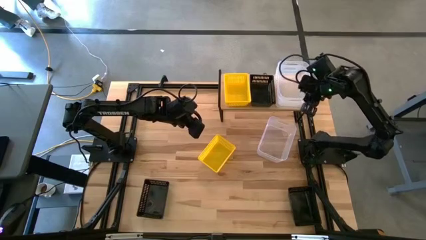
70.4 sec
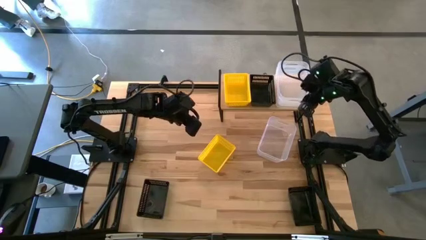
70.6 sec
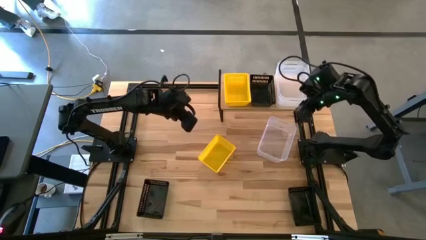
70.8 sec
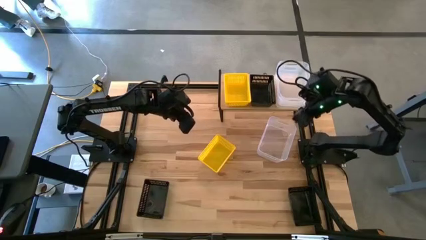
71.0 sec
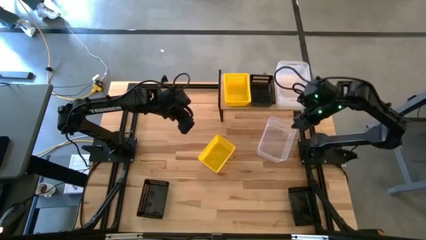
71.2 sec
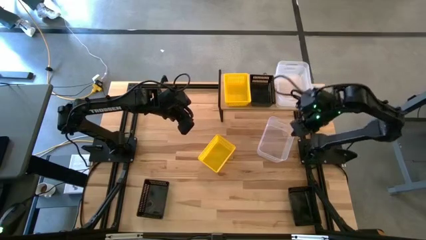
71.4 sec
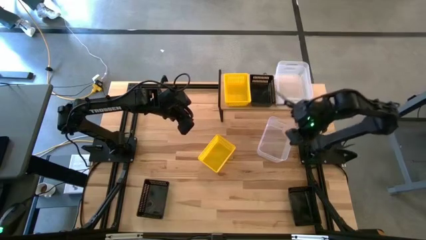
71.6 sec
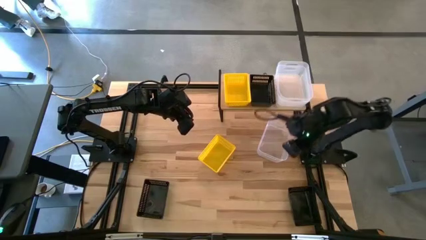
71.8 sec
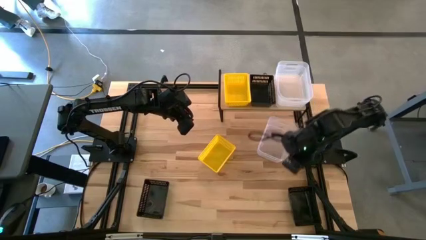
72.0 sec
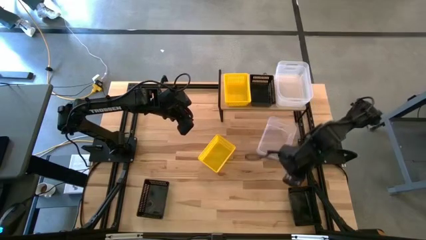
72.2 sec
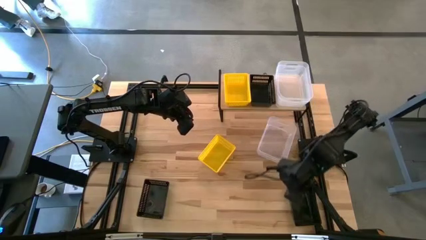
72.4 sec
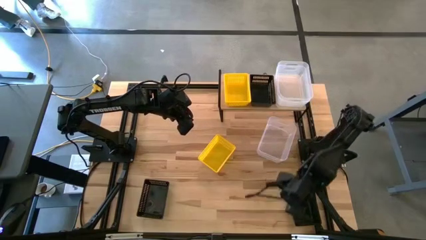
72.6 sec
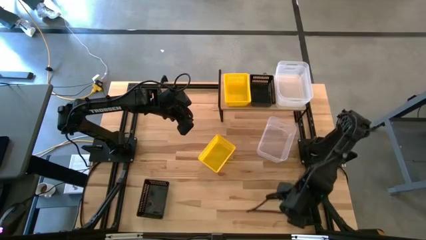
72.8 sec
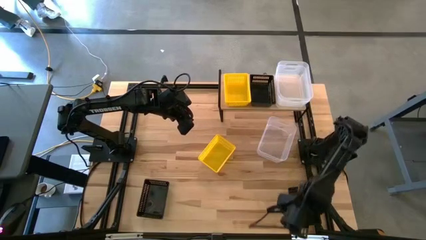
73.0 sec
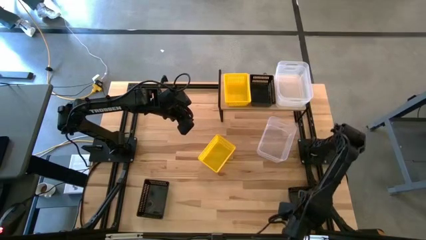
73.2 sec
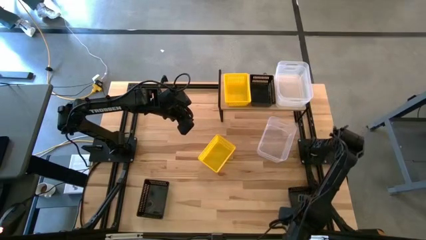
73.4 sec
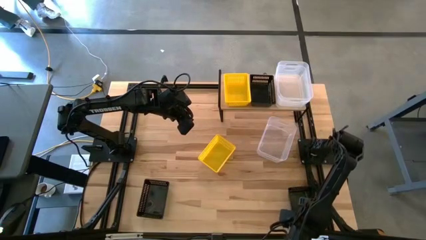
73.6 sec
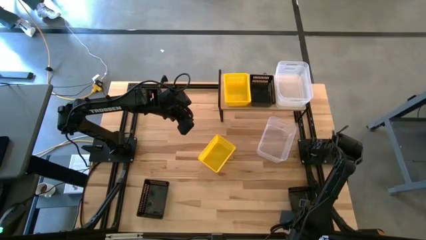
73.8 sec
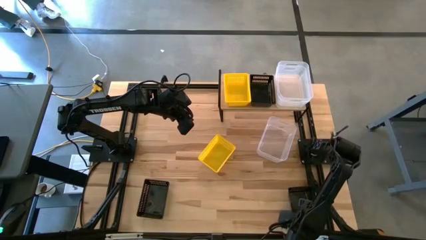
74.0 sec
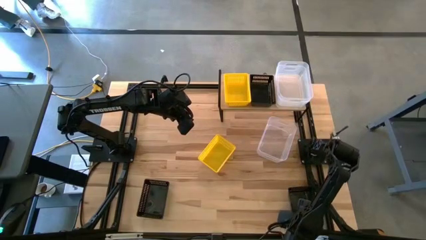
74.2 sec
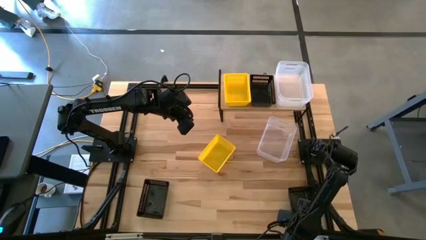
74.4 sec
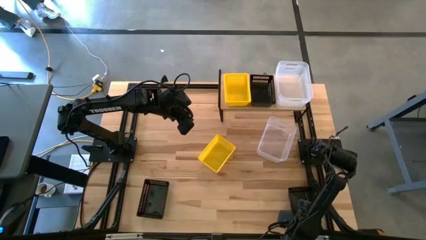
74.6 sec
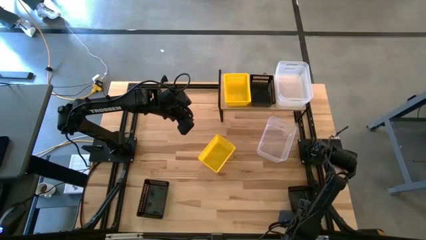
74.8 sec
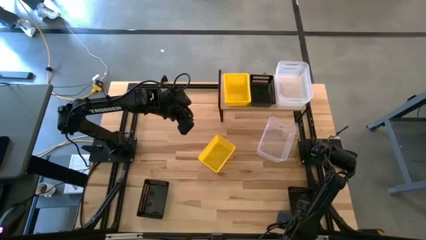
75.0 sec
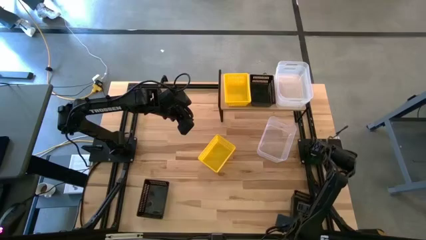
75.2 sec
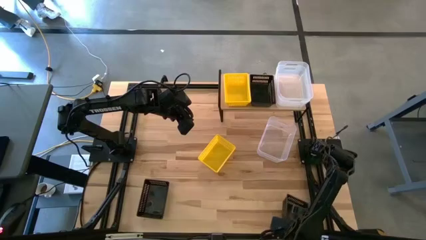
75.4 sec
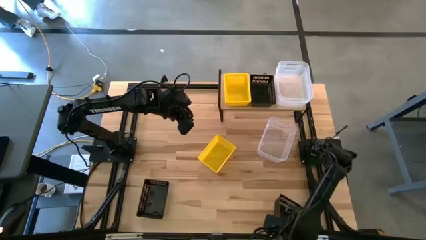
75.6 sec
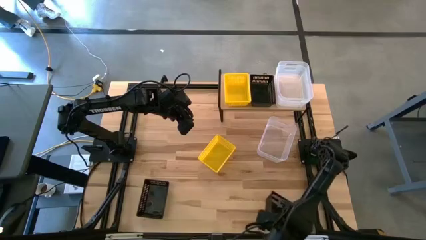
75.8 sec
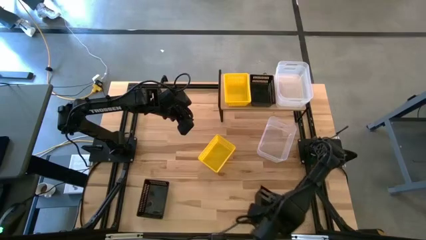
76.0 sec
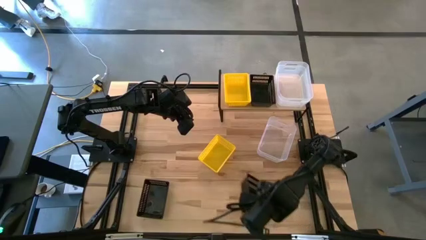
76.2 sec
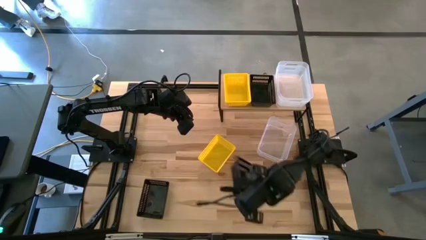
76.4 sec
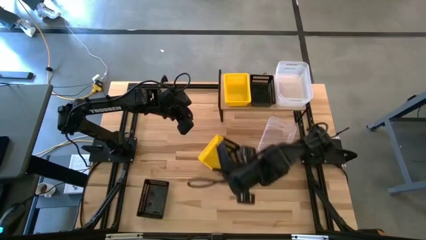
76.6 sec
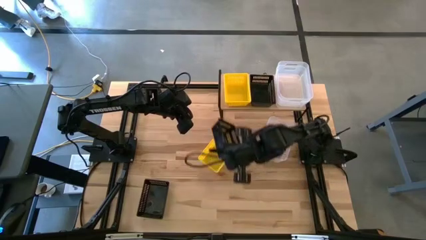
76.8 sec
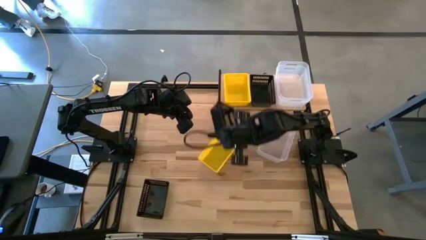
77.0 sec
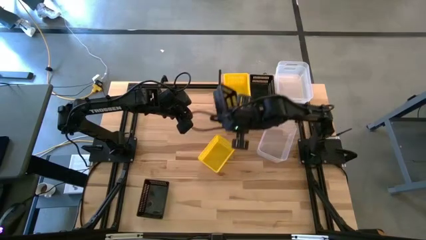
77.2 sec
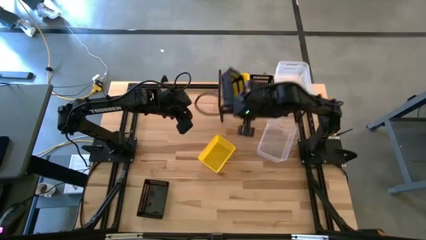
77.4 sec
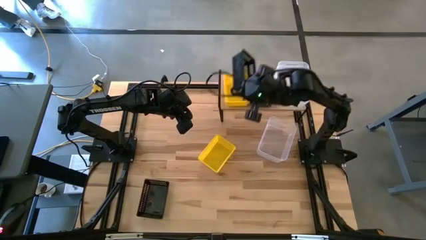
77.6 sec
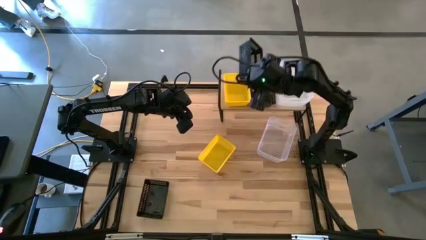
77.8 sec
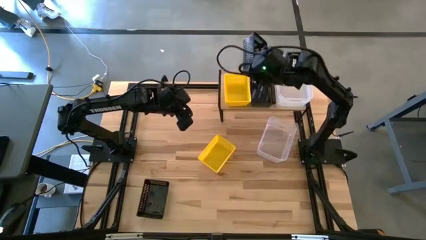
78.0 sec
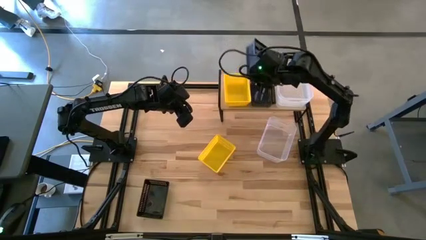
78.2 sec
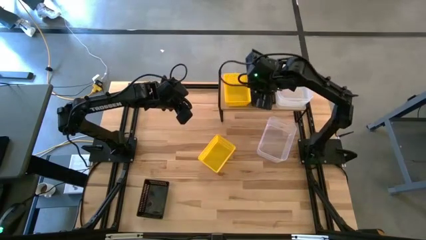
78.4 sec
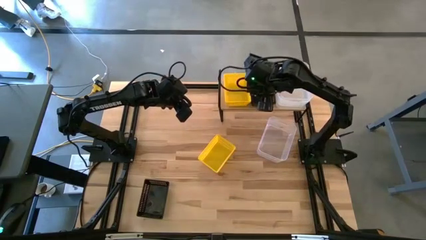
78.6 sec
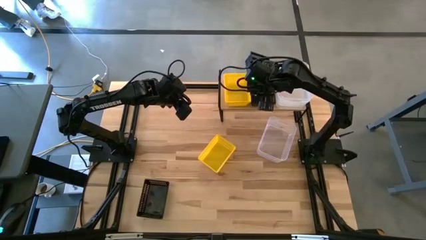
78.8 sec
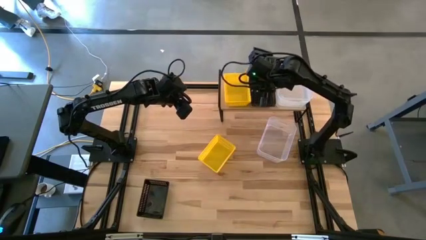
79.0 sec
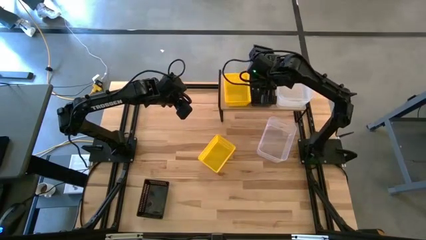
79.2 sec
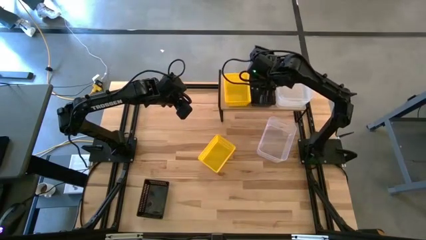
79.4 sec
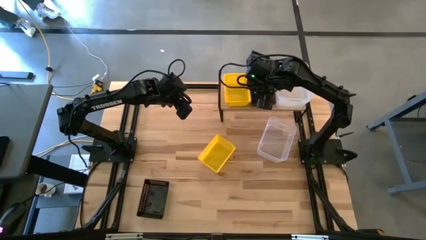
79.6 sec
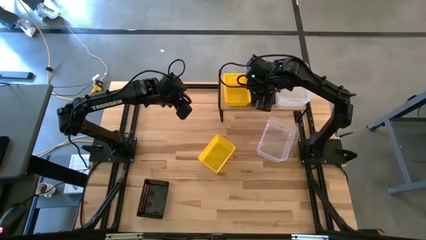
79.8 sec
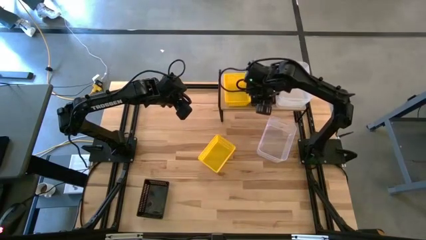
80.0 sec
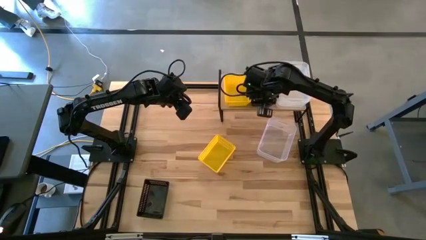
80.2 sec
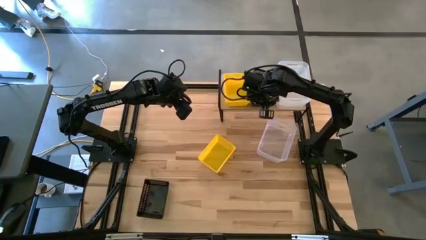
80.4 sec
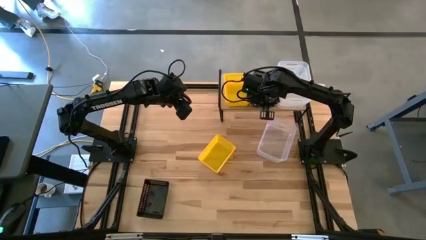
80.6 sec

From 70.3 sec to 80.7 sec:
Task: Stack baskets on shelf by color
Stack the right black bin on top of the other black bin on the shelf
